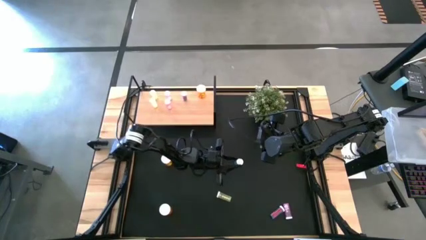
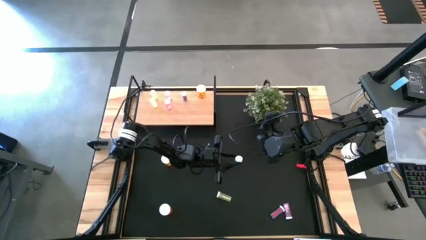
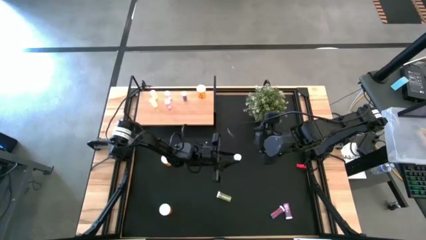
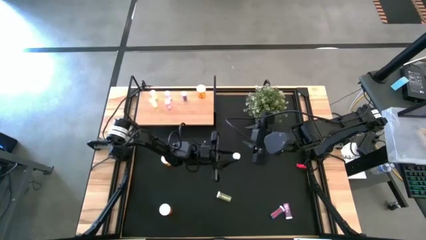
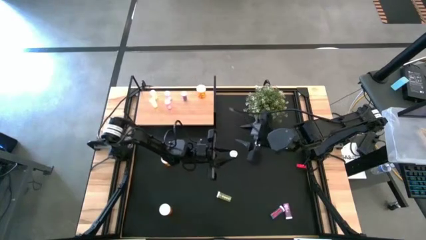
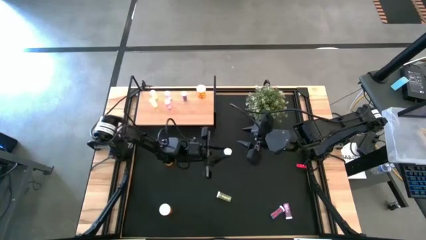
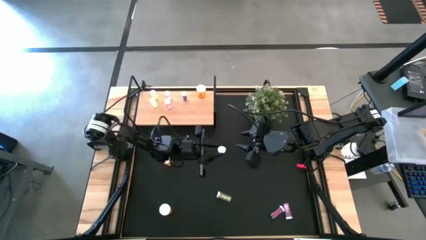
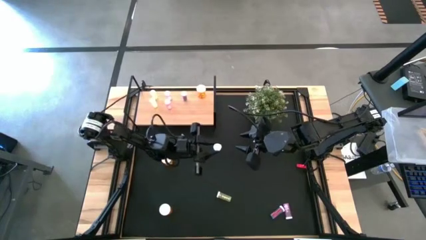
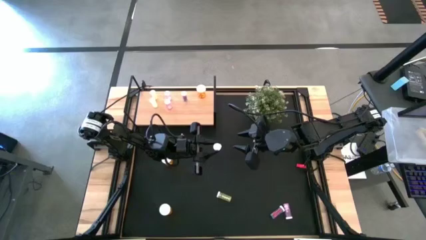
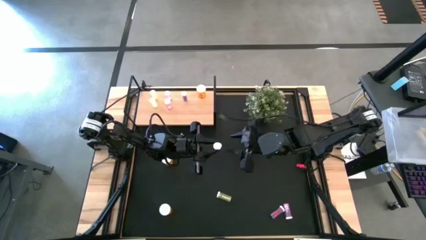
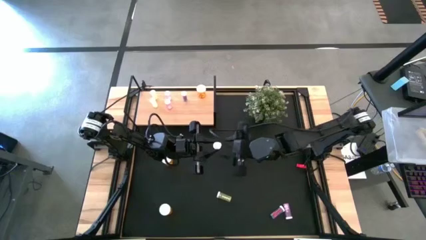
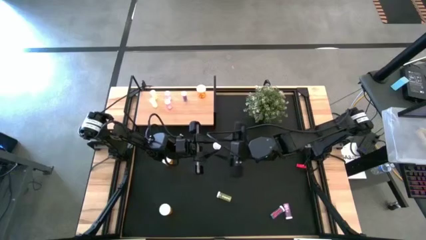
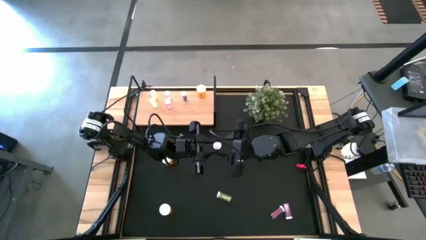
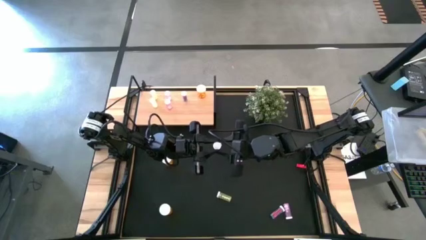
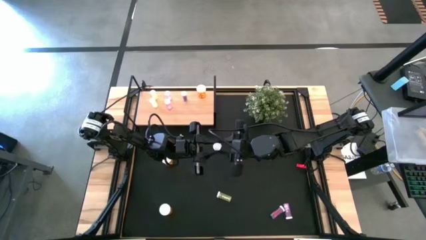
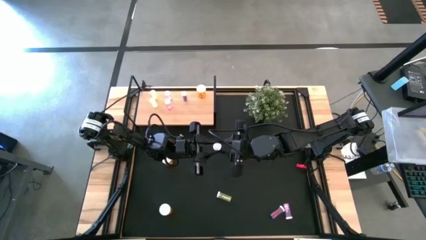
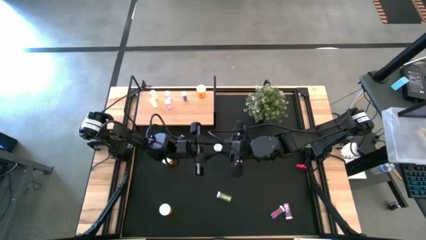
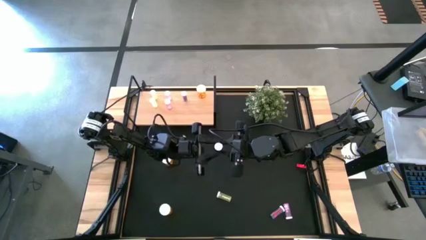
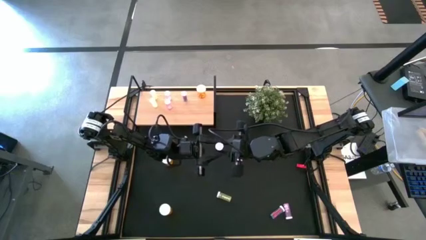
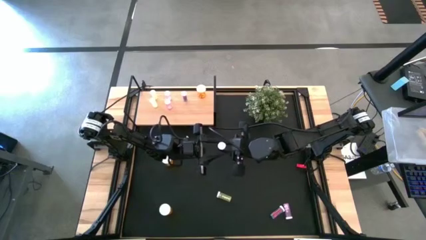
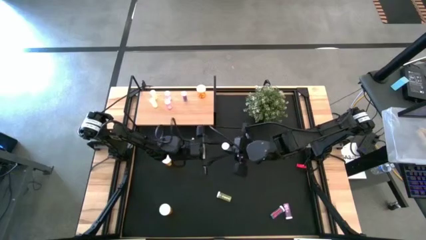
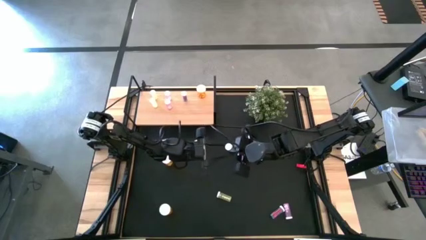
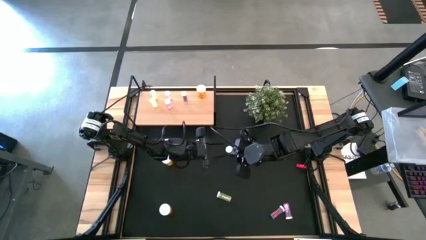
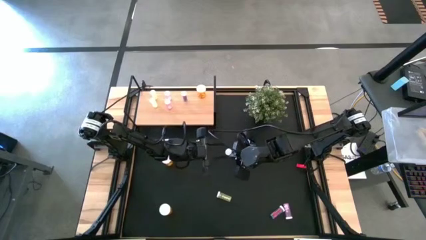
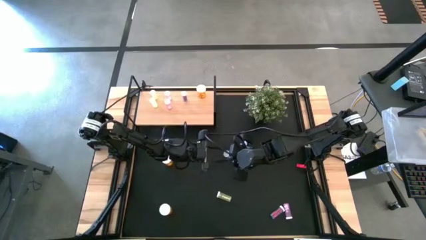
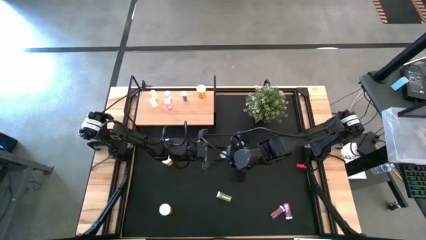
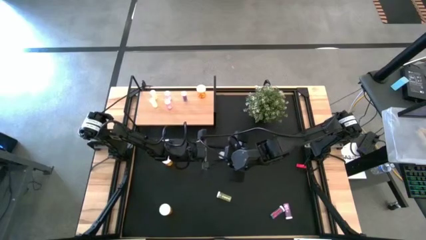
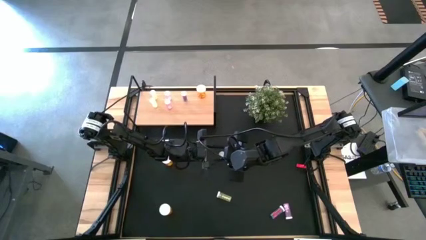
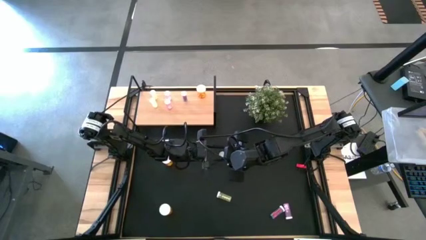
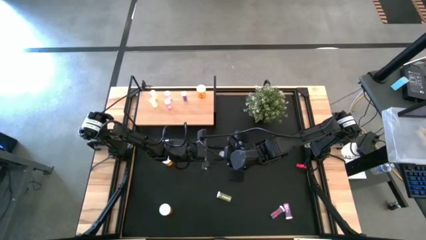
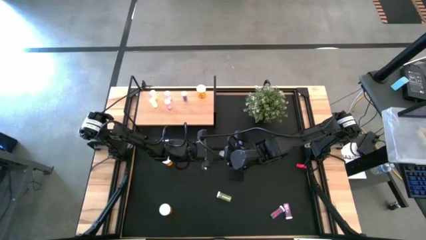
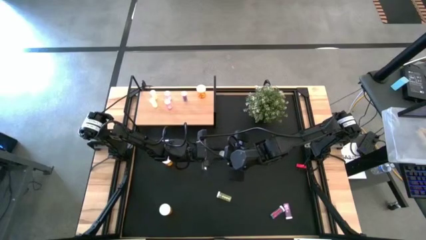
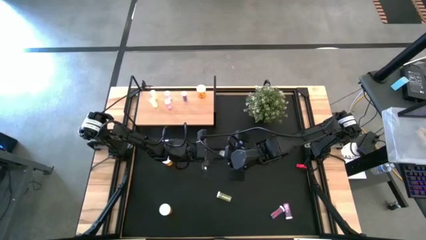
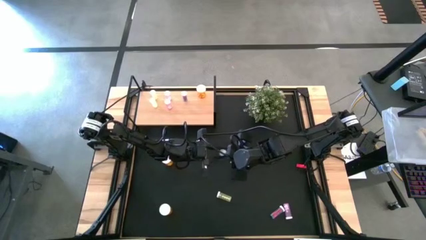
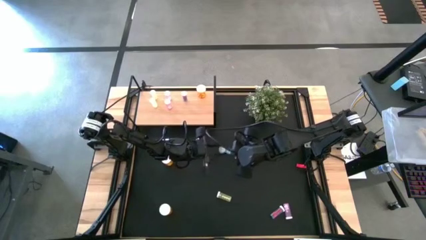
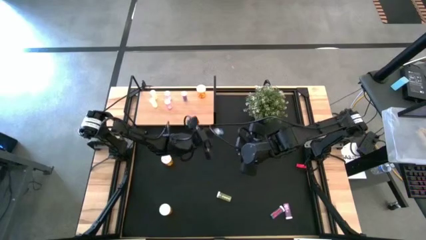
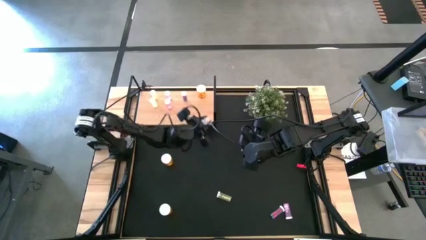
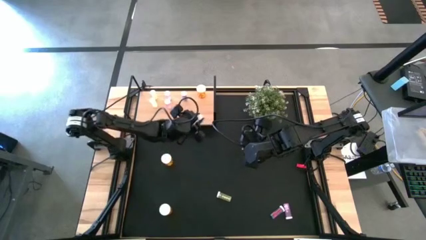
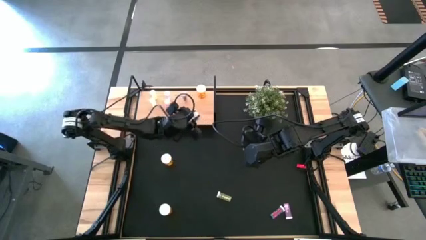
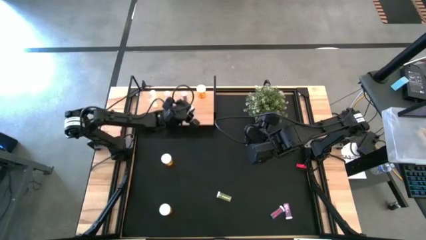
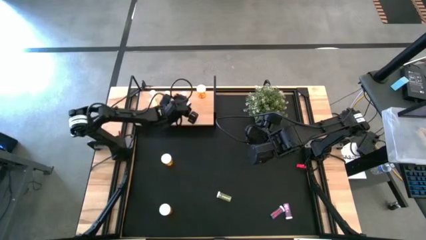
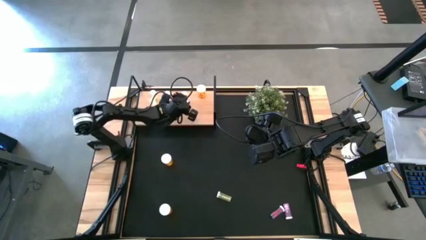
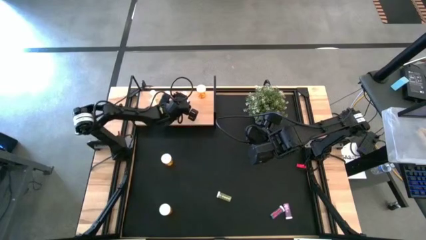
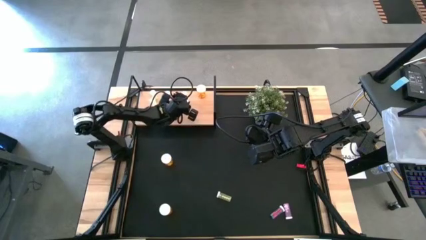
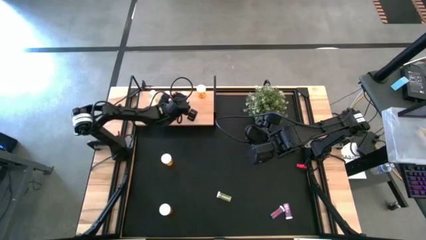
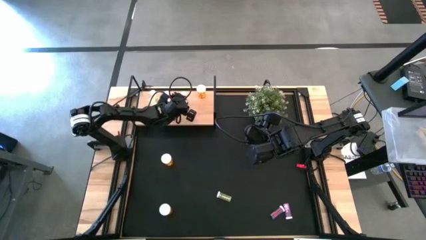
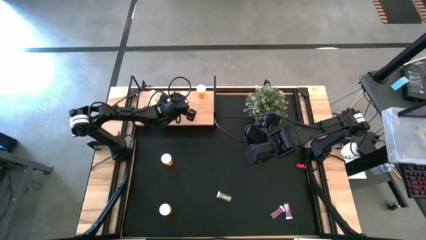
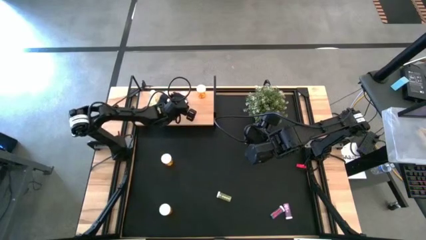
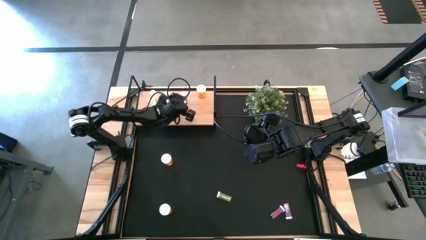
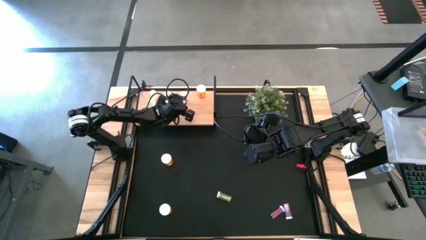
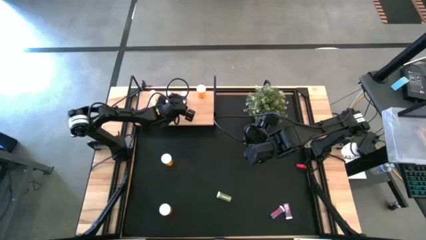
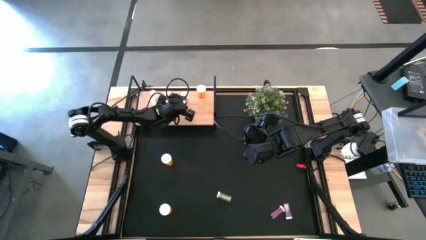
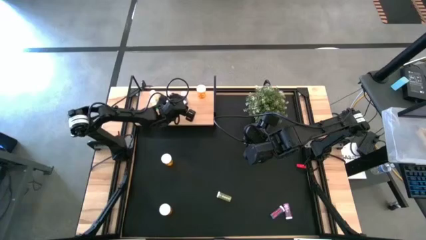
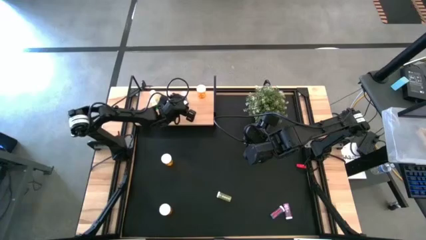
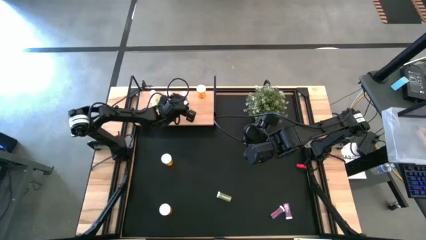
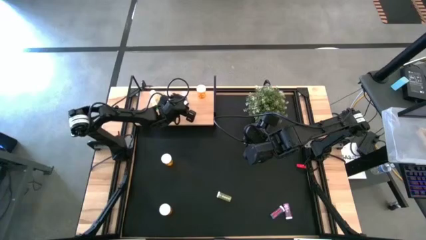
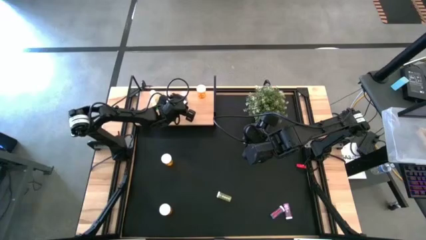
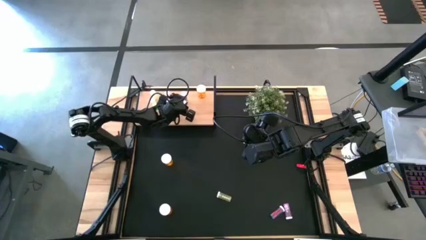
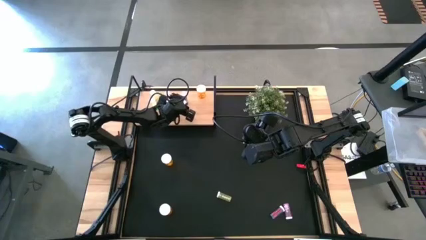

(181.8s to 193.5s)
Task: Pick and place medicine bottles onto shelf by color
Put the top blue medicine bottle on the shelf aligned with the other blue medicine bottle

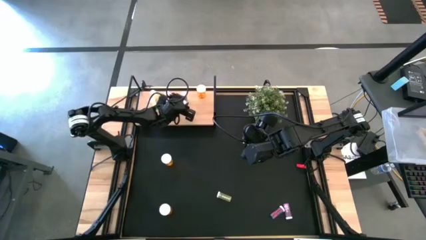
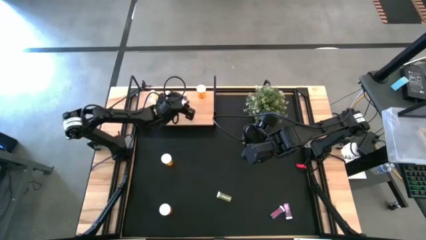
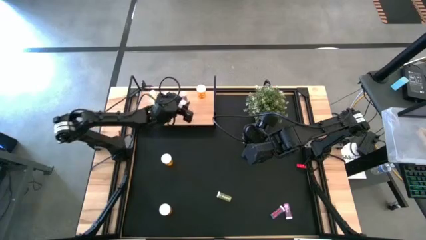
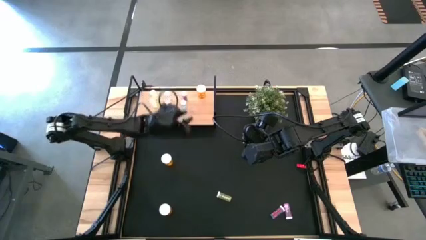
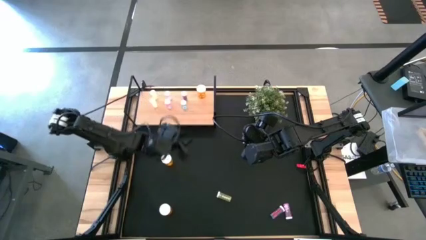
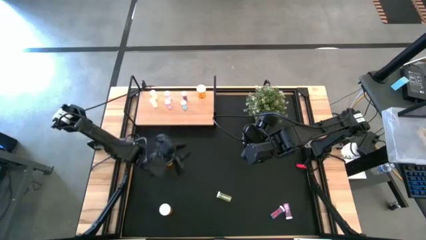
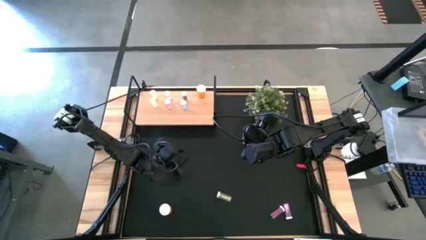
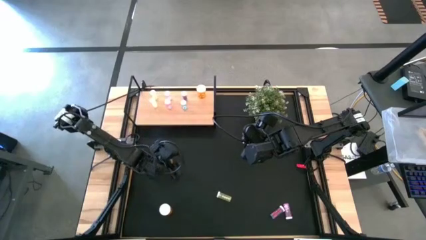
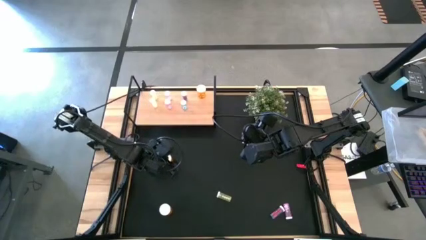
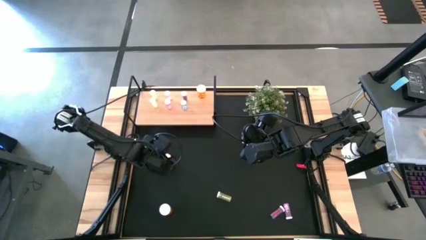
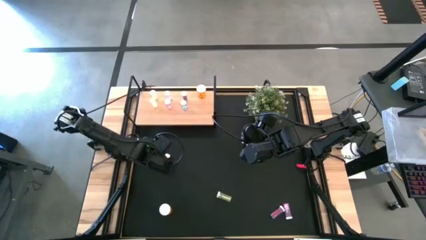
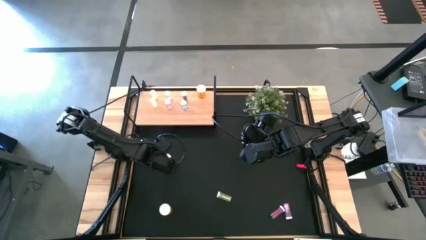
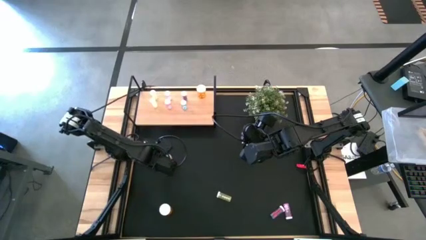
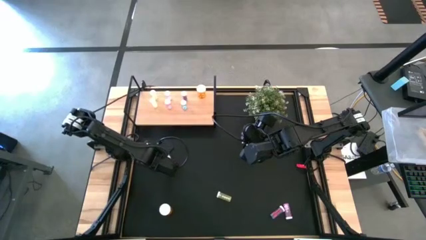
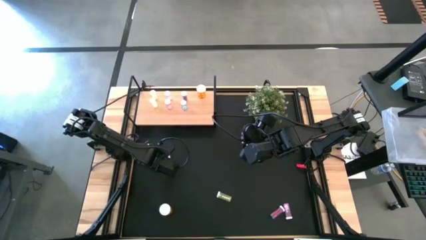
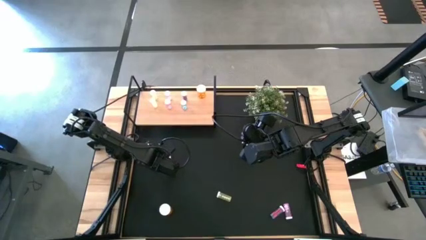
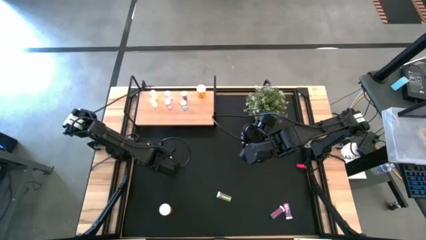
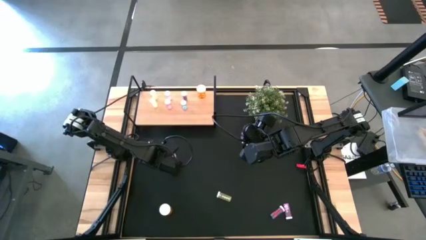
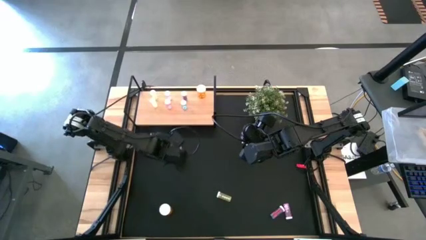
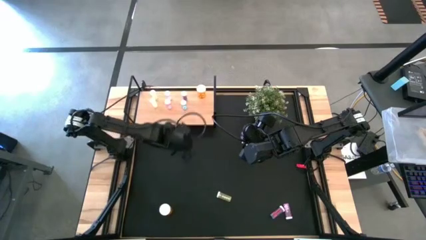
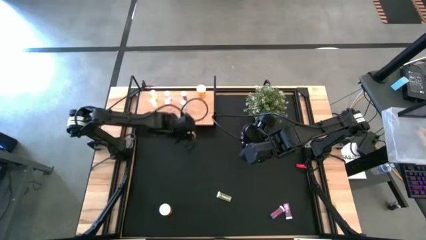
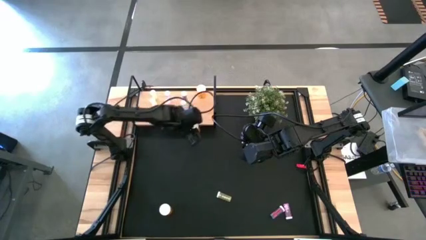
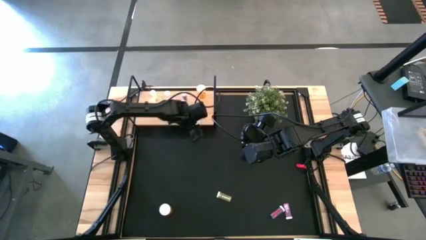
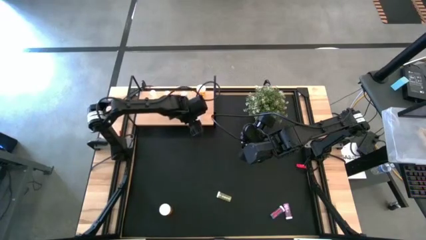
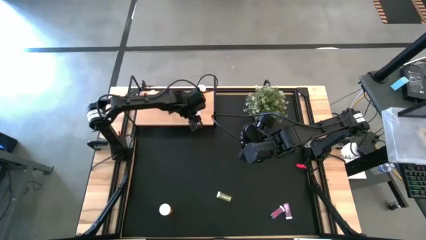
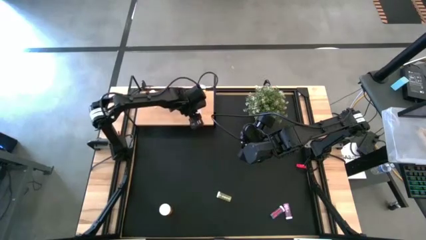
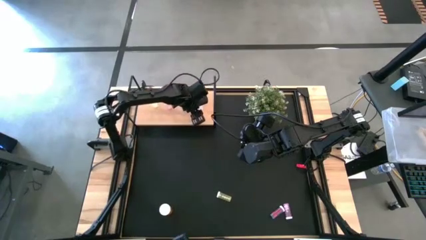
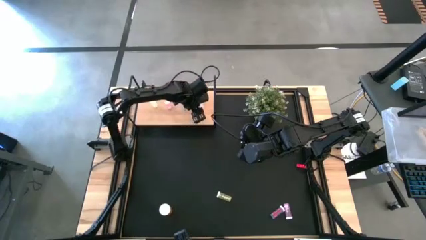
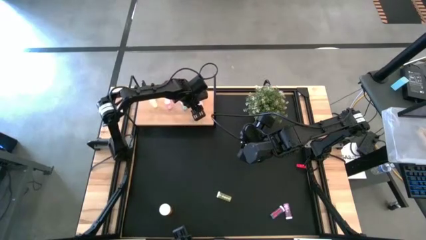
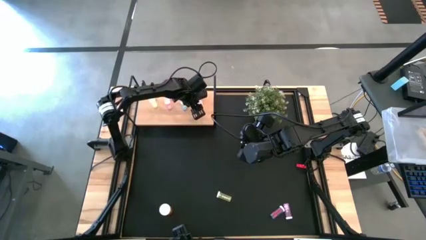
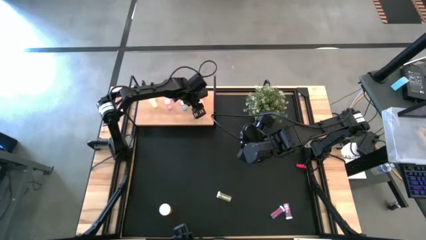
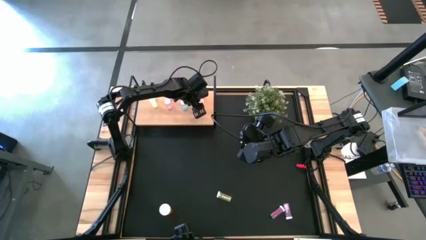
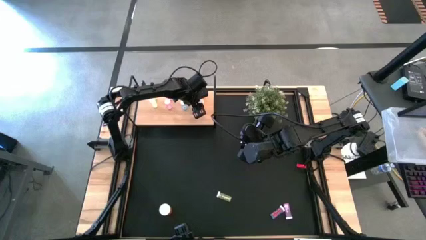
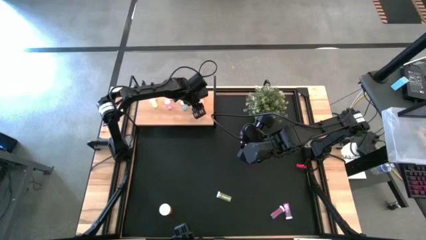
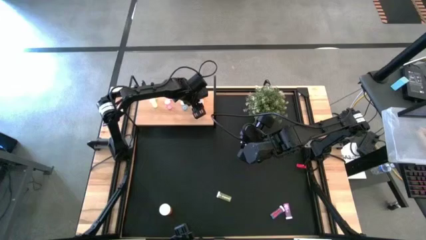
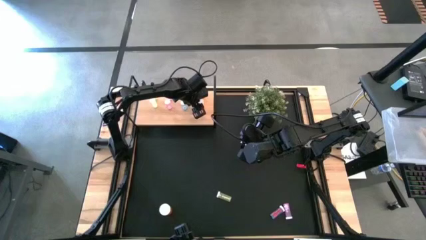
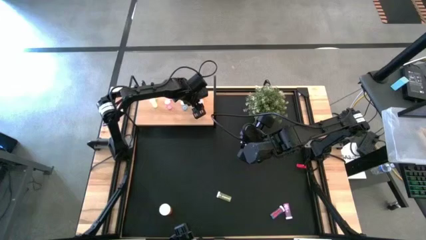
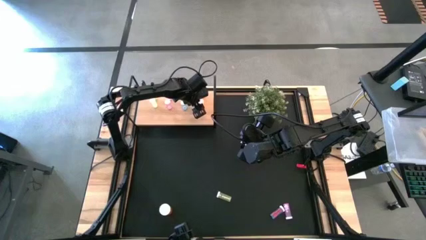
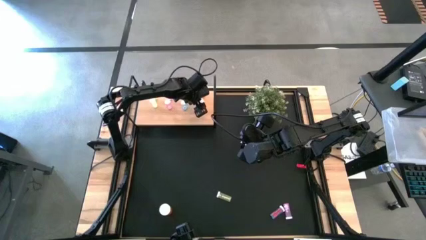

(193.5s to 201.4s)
Put the top orange medicine bottle on the shelf aligned with the other orange medicine bottle
